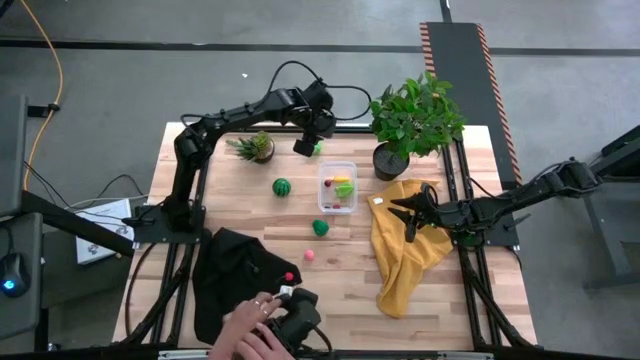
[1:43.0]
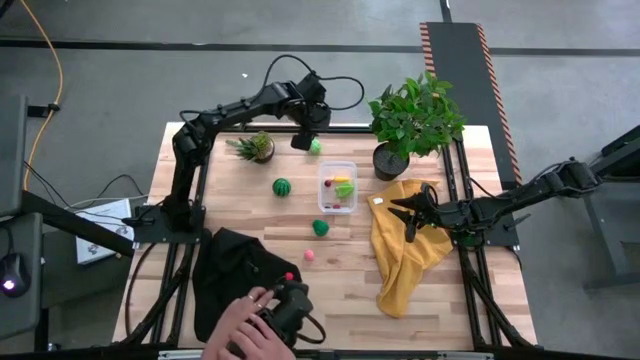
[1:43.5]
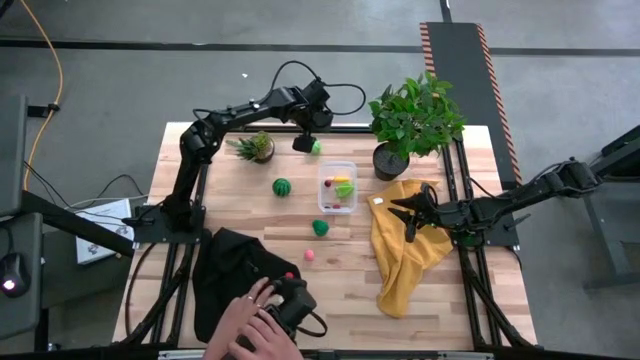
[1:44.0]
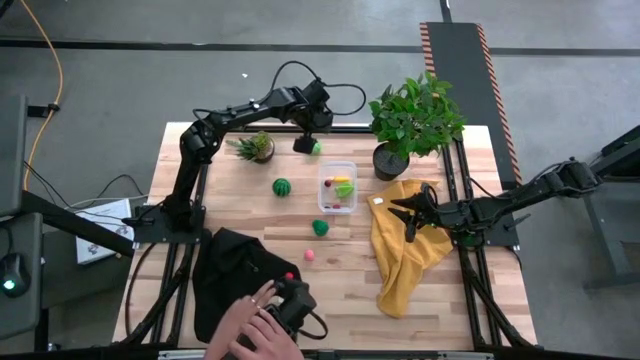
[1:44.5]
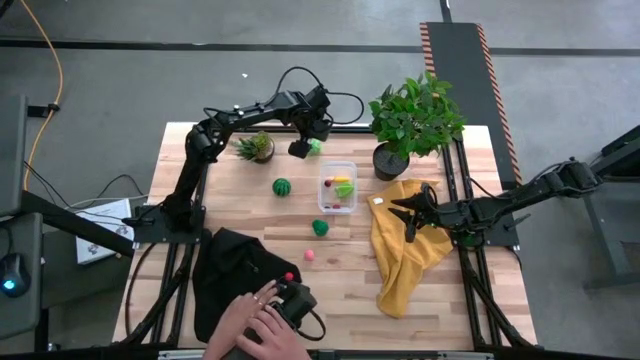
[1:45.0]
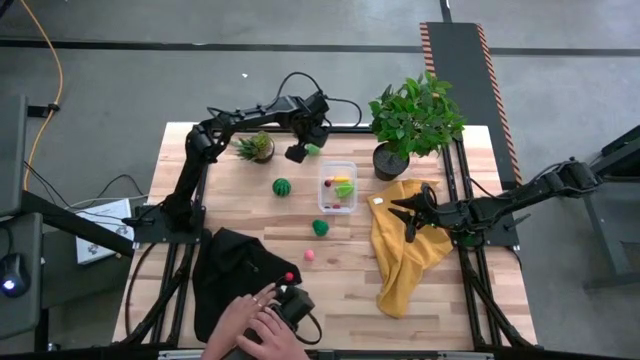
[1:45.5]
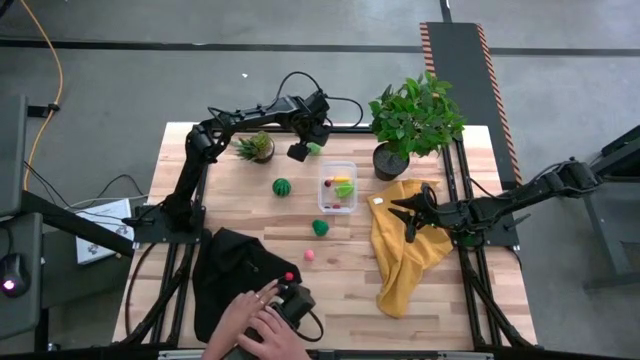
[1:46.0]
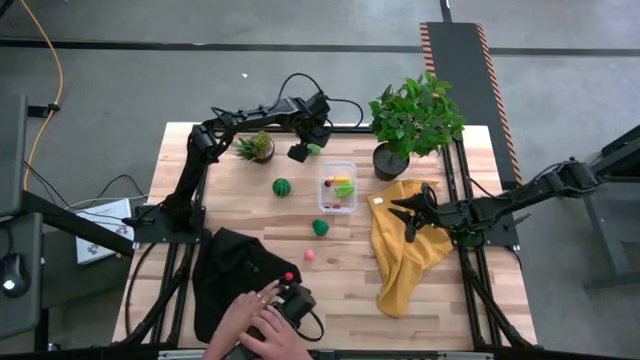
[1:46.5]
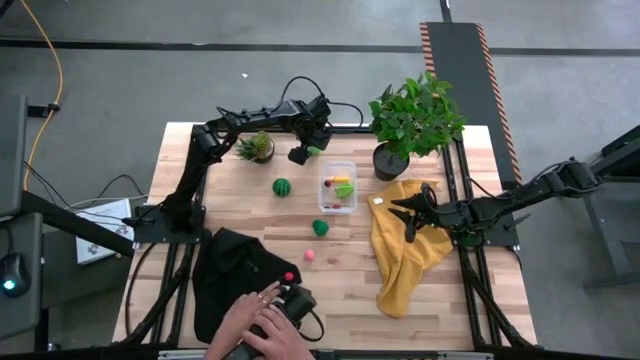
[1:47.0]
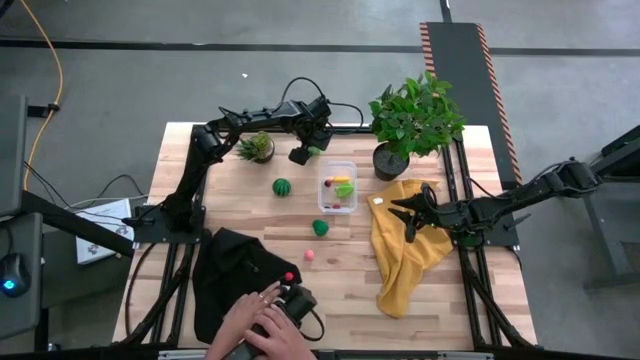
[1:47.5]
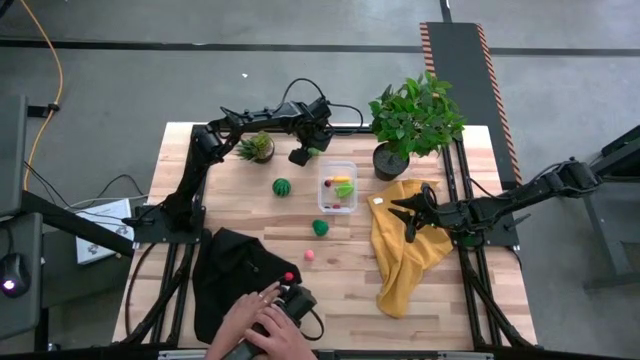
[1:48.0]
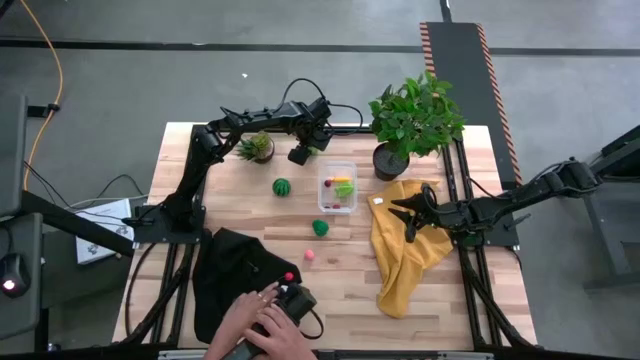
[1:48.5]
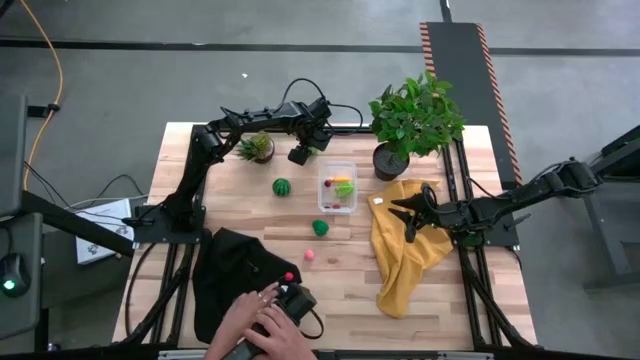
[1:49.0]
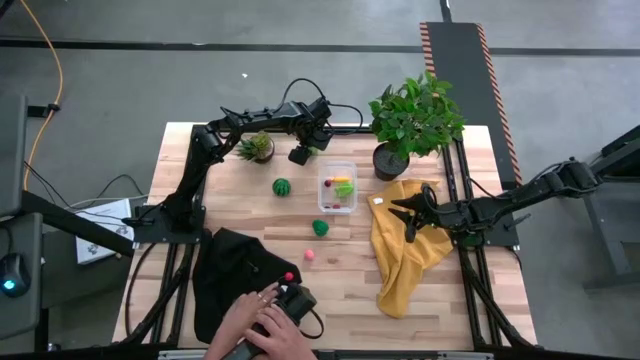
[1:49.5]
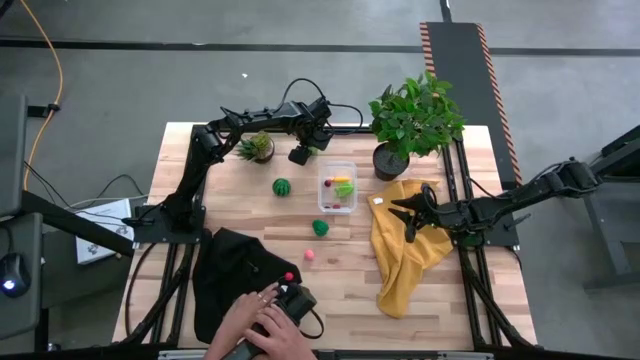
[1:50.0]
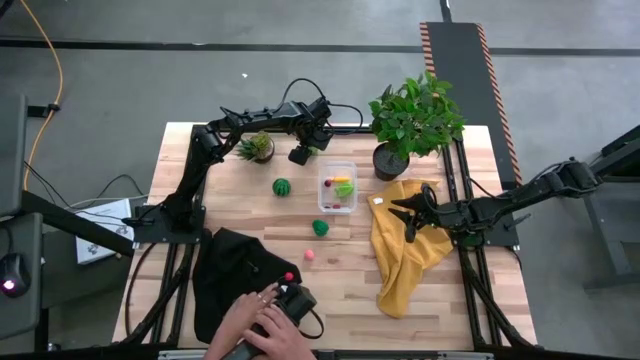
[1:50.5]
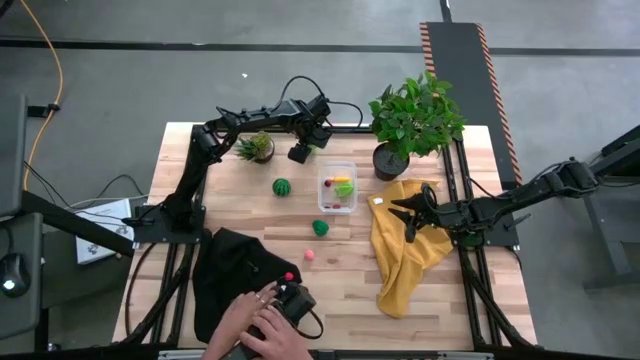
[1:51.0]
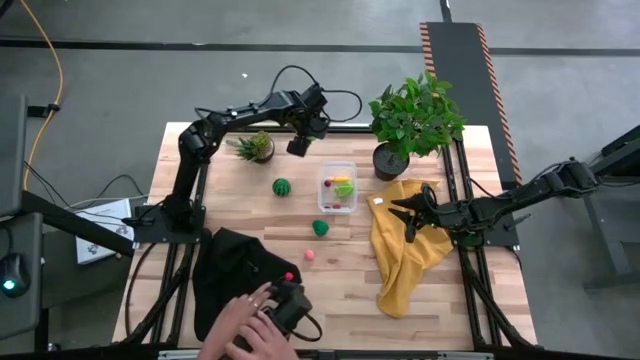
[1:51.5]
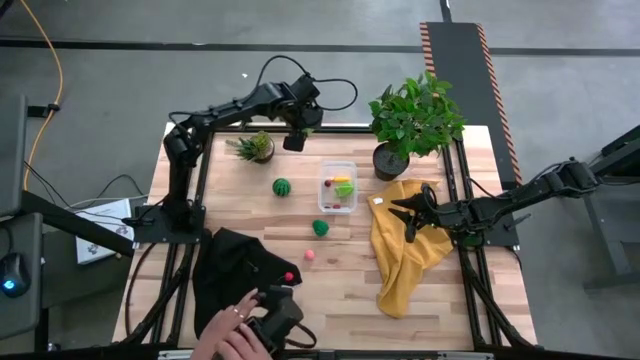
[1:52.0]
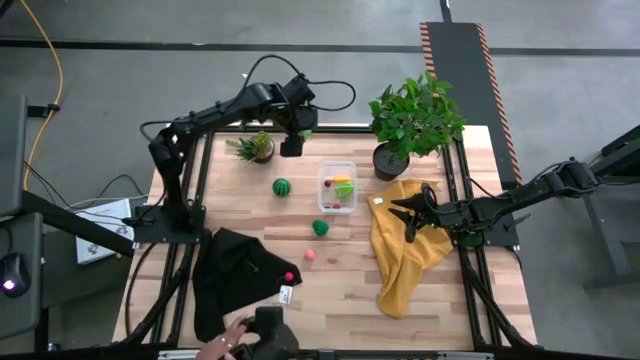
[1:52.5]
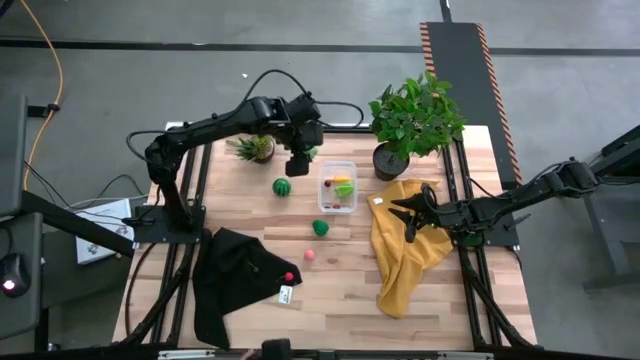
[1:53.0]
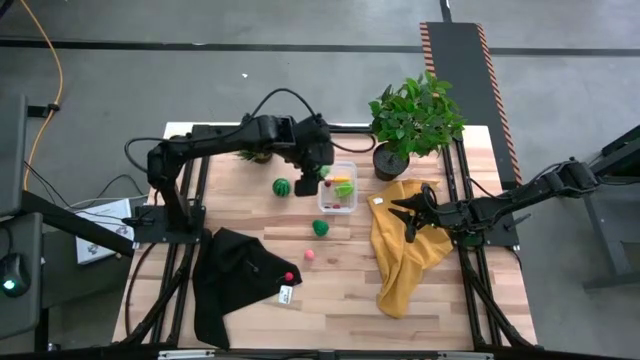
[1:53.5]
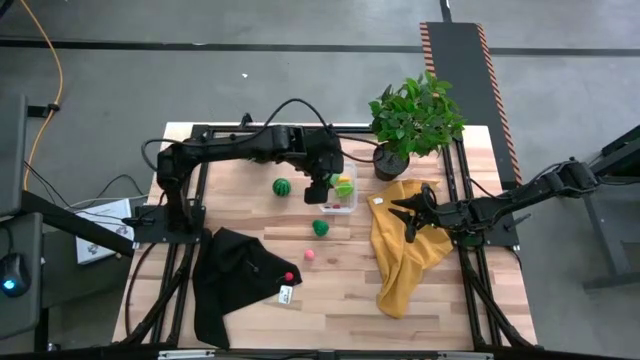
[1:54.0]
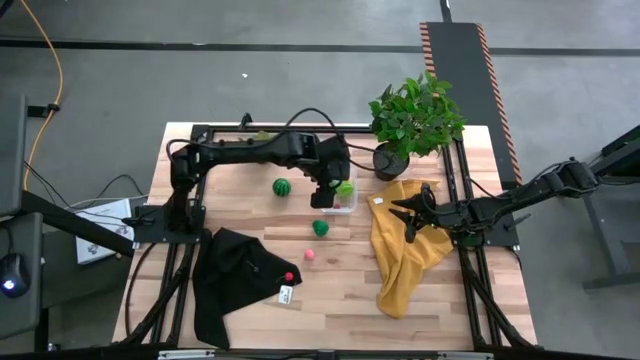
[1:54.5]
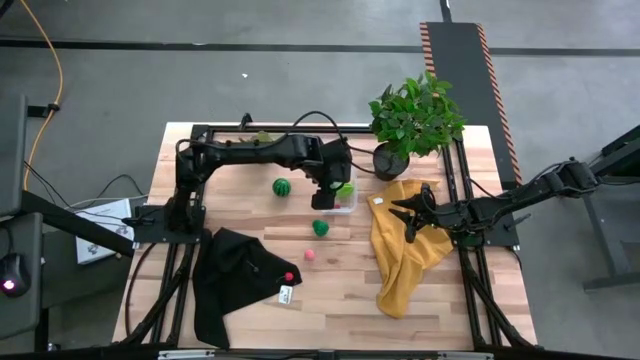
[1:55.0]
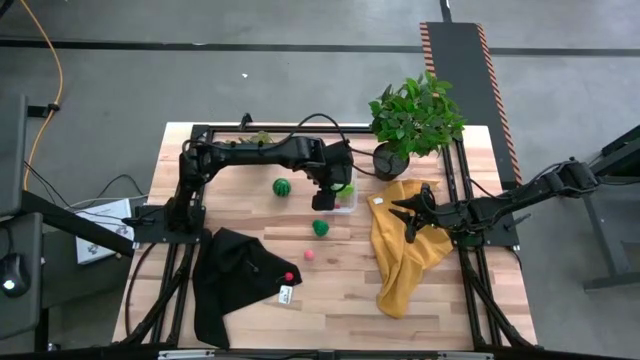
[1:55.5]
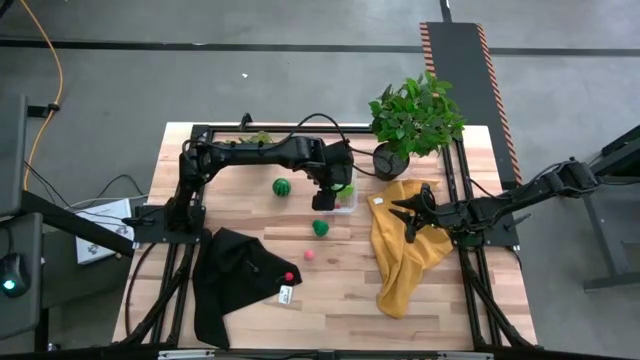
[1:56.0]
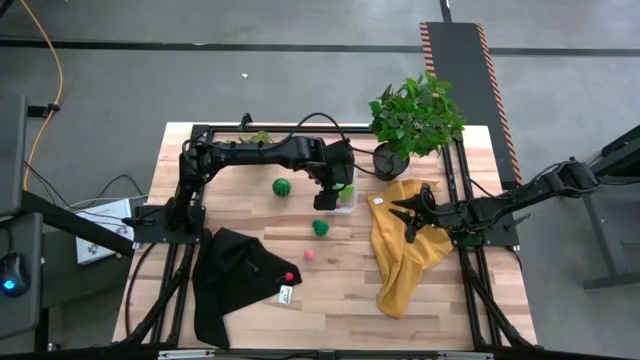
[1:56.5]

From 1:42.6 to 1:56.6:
Task: Pick and placing Produce into tupperware
Put the cabbage into the transparent bin

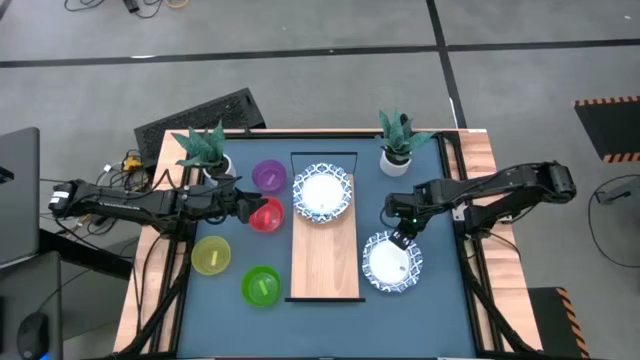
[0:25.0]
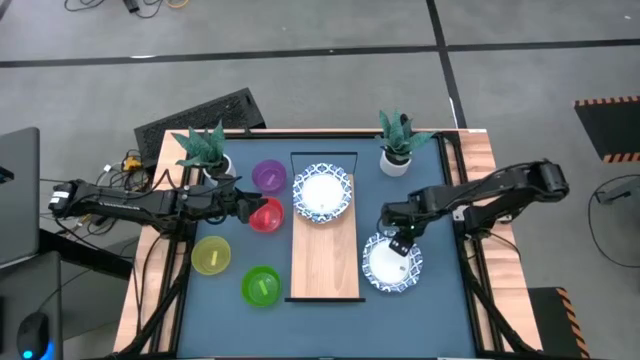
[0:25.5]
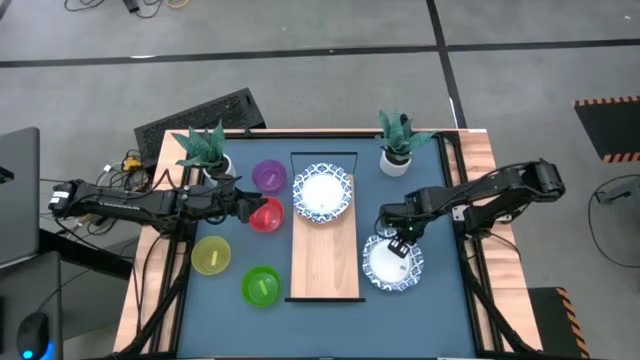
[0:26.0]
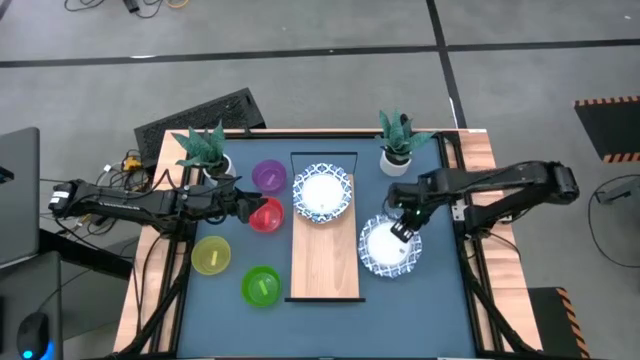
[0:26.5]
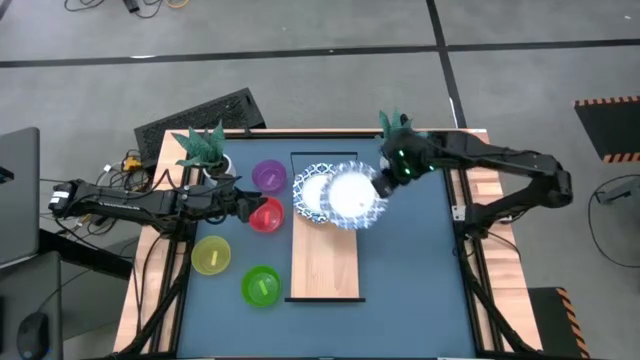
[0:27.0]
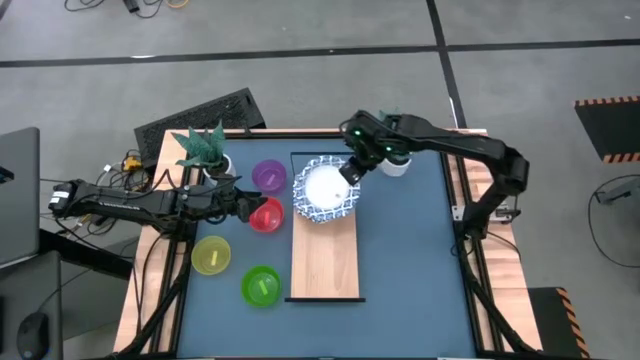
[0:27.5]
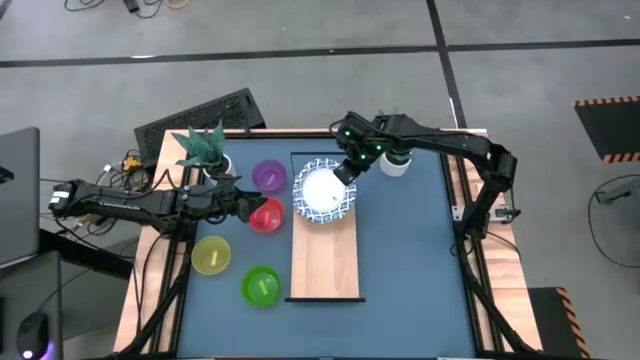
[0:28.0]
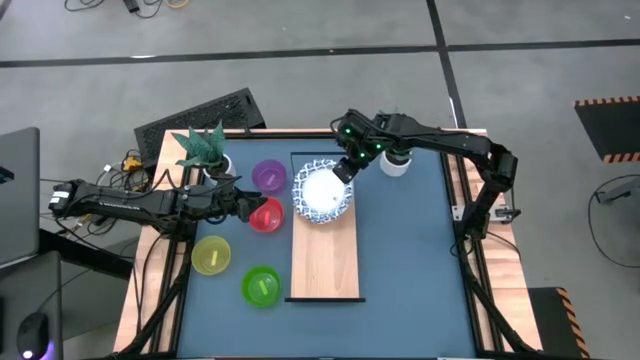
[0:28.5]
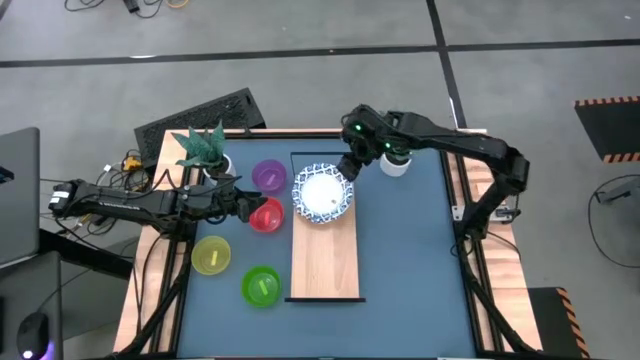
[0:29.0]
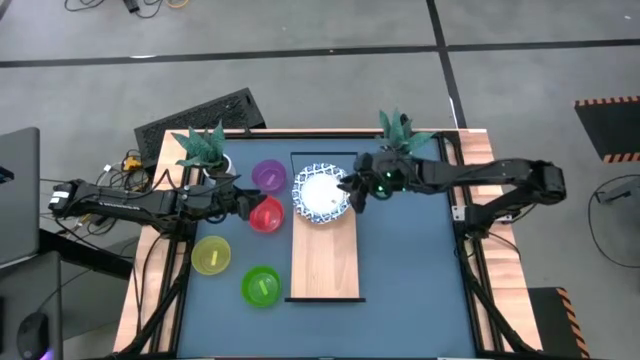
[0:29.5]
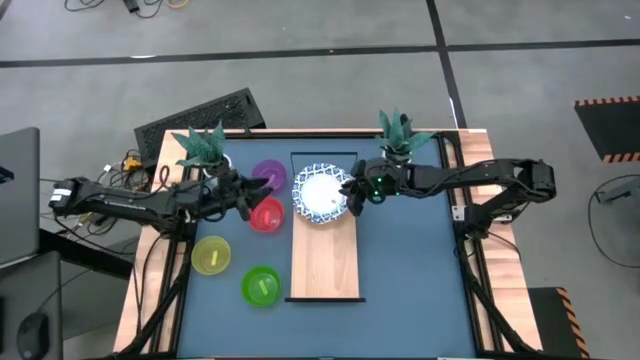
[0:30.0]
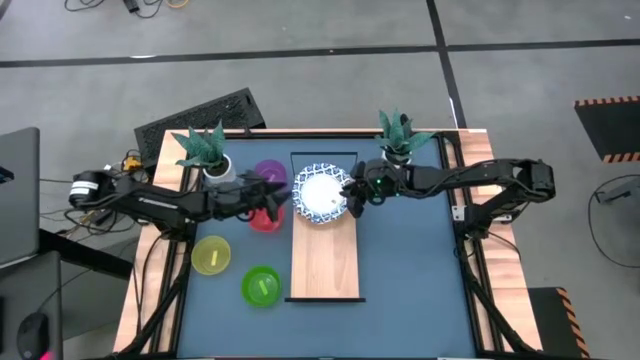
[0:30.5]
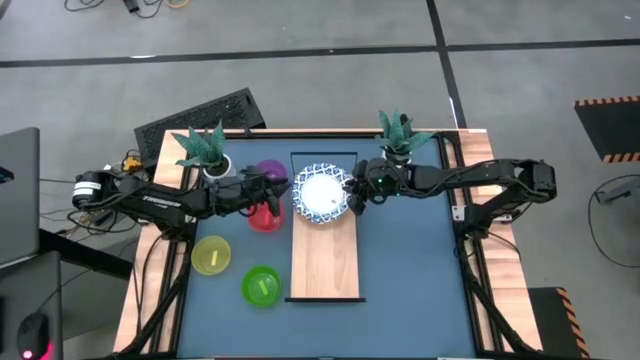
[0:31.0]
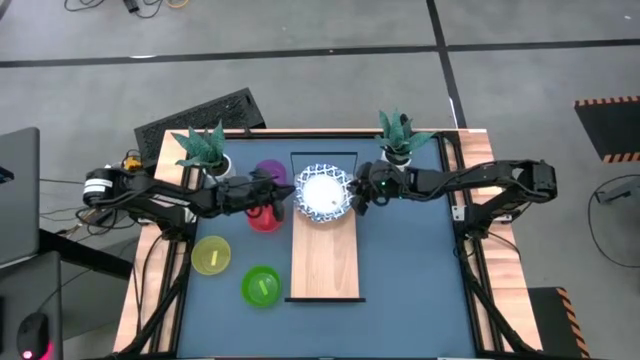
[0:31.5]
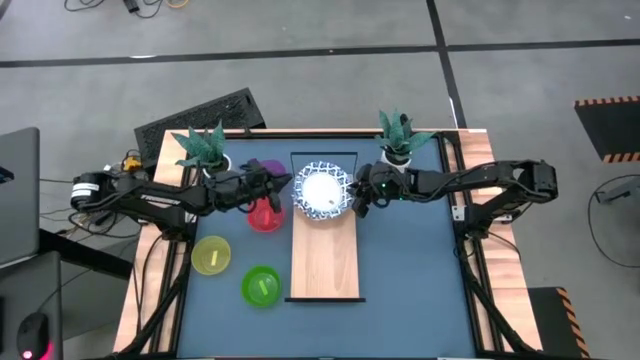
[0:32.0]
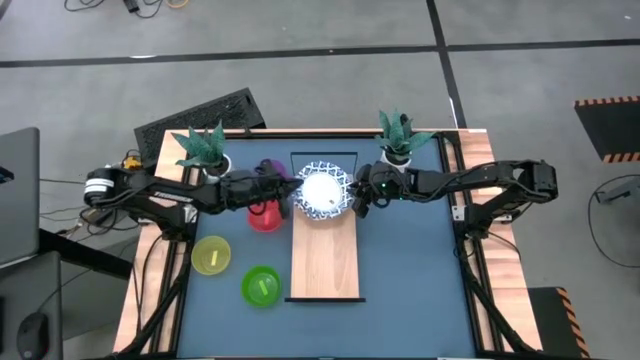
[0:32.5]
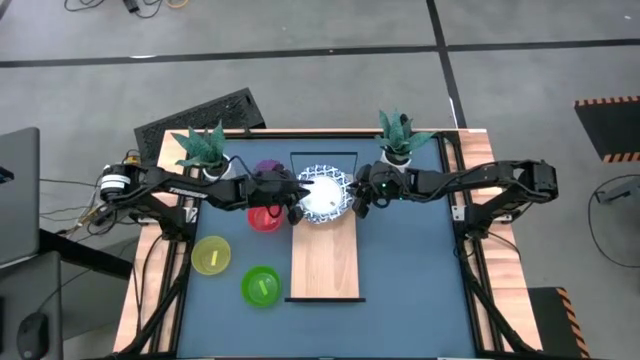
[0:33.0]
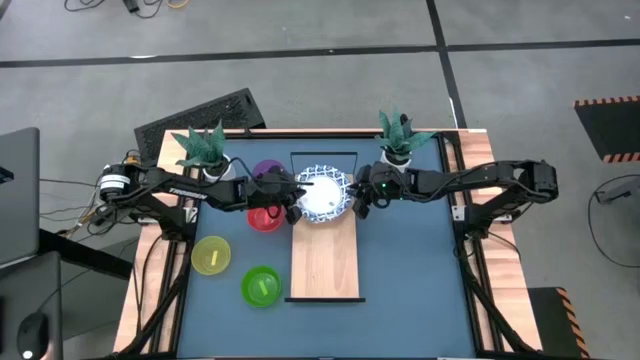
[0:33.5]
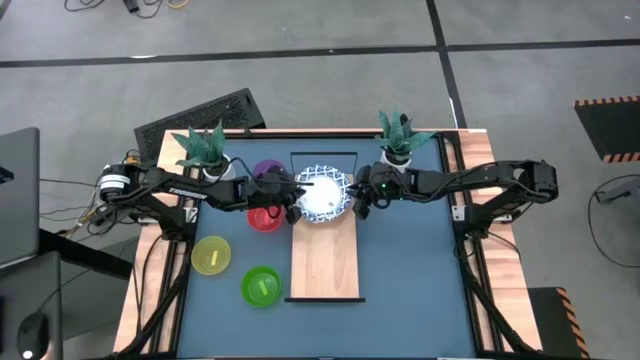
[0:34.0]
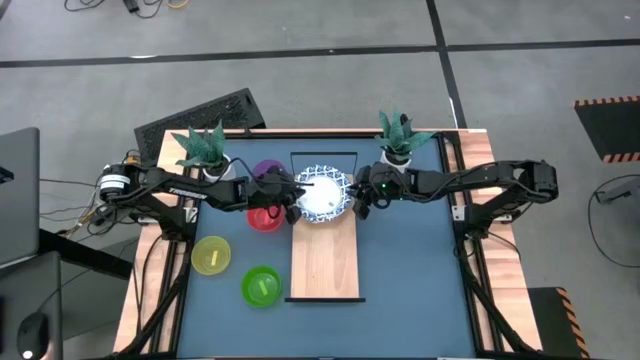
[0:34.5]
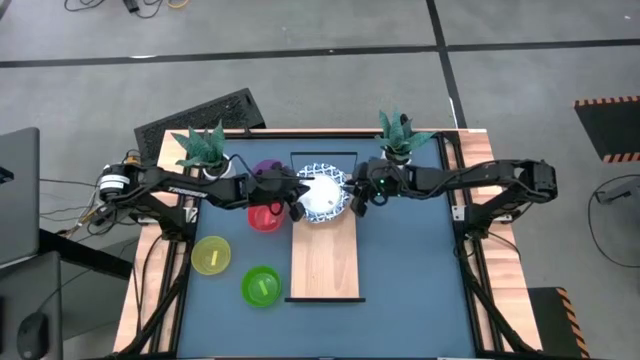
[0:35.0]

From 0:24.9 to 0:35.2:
Task: Place and stack bowls onto a shelf
Stack the white patterned bowl on top of the white patterned bowl on the shelf
